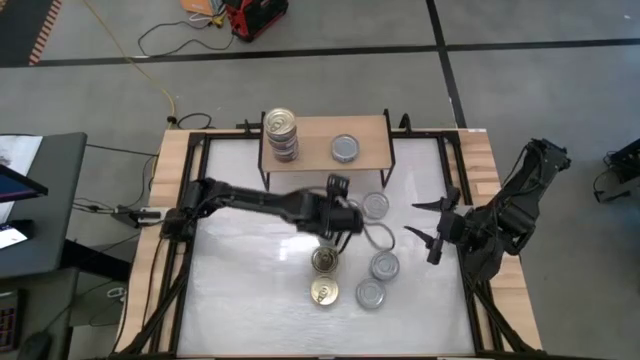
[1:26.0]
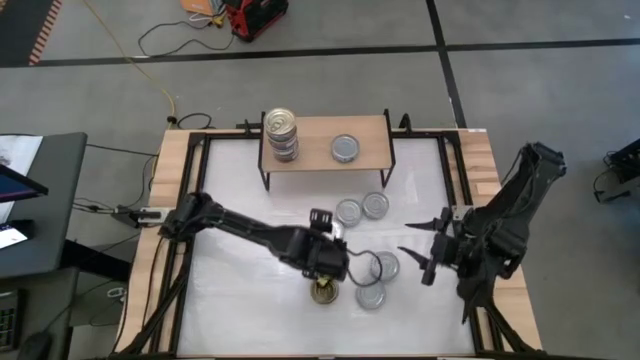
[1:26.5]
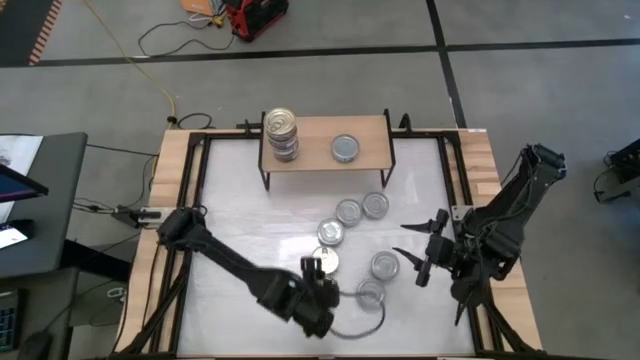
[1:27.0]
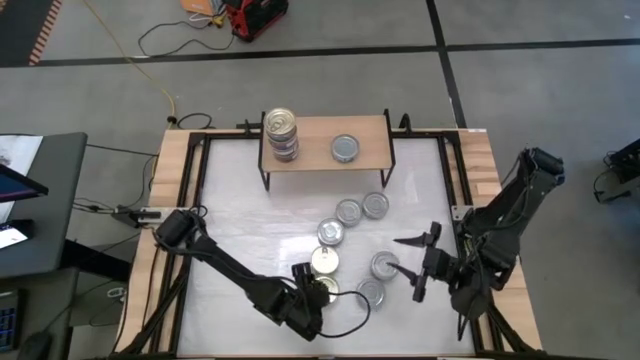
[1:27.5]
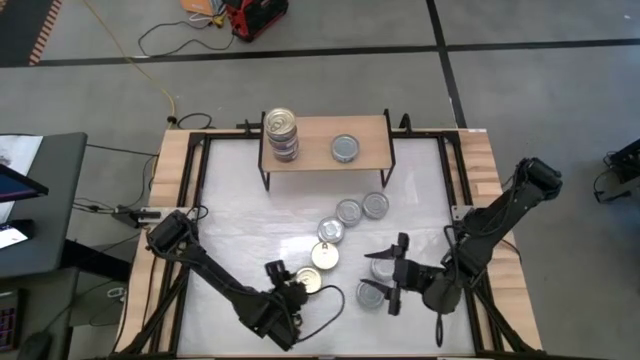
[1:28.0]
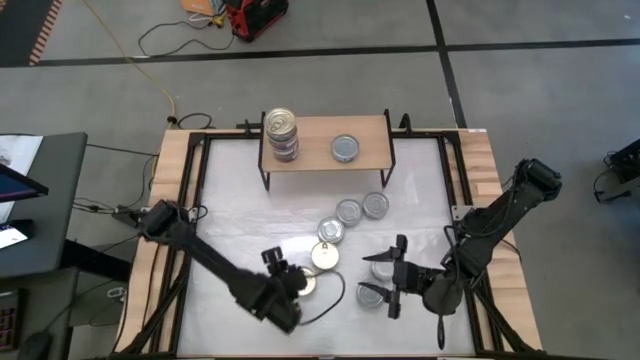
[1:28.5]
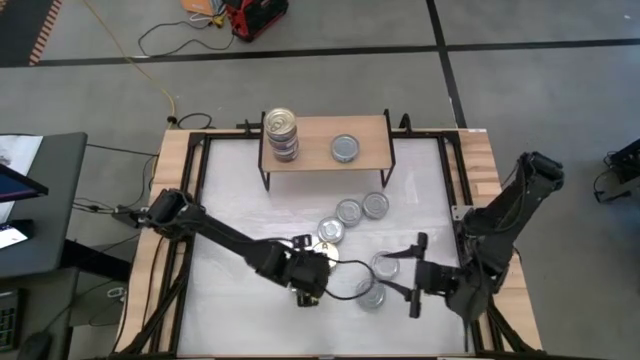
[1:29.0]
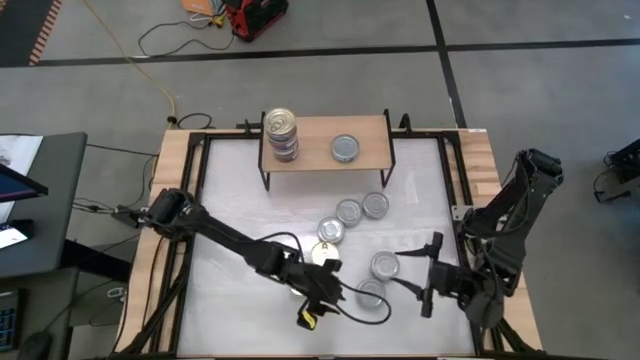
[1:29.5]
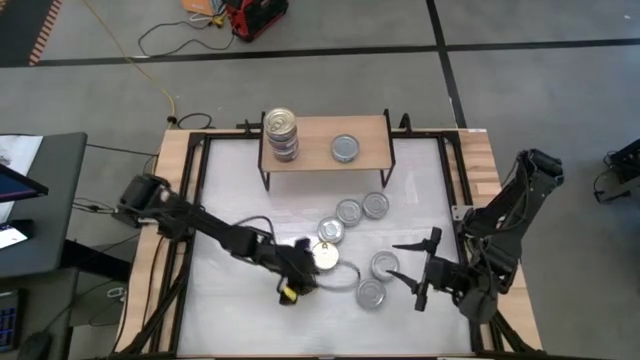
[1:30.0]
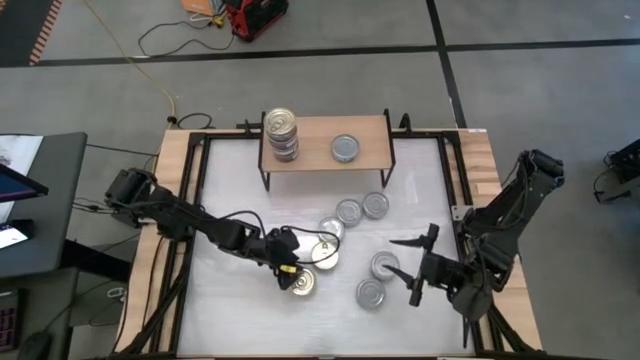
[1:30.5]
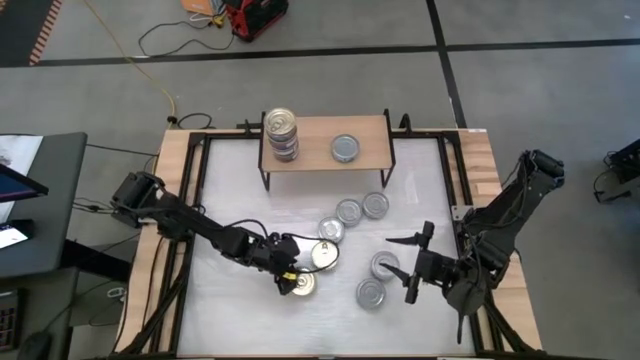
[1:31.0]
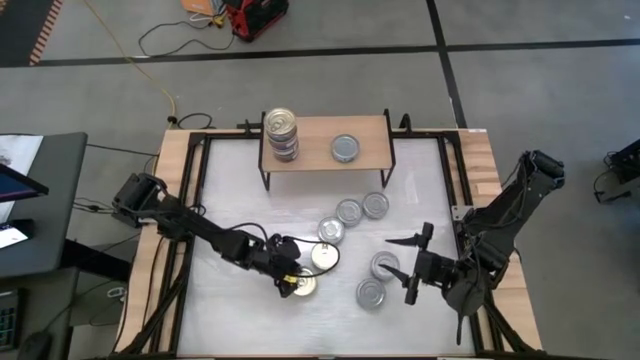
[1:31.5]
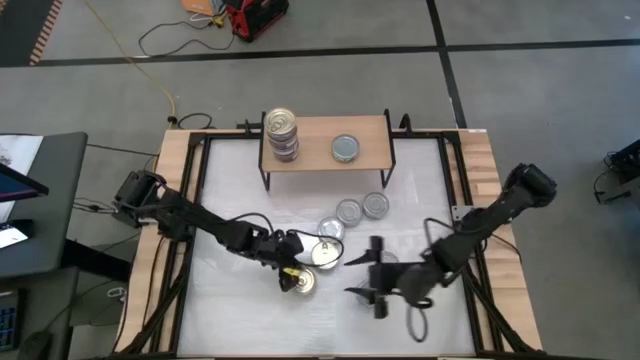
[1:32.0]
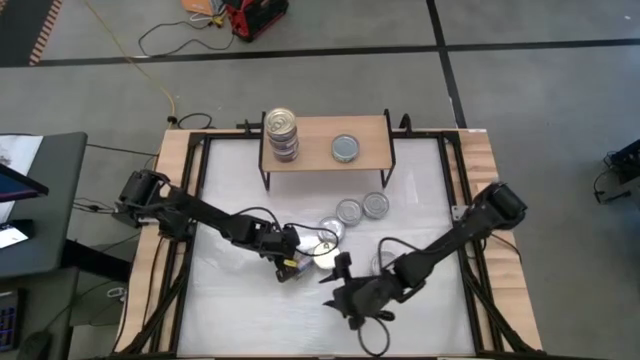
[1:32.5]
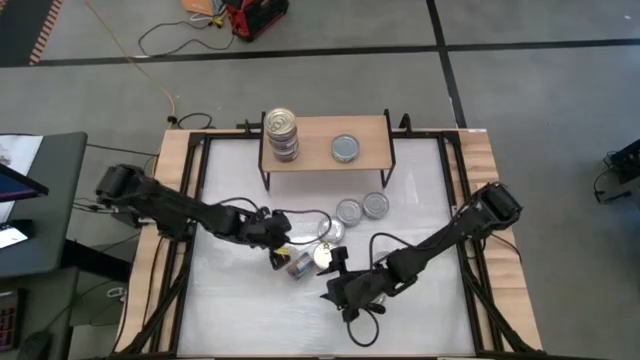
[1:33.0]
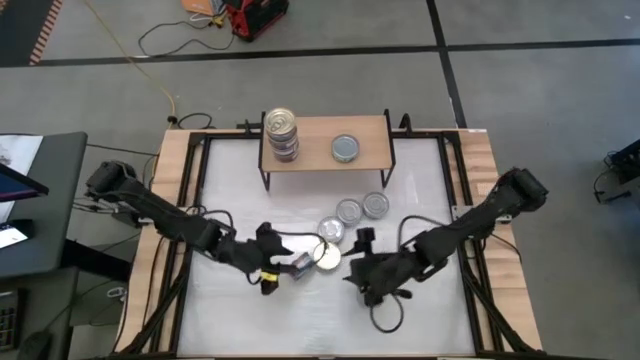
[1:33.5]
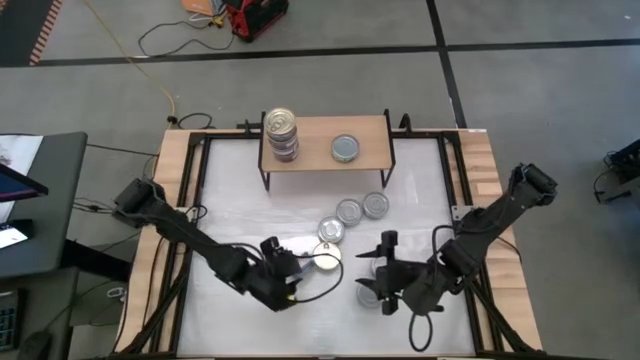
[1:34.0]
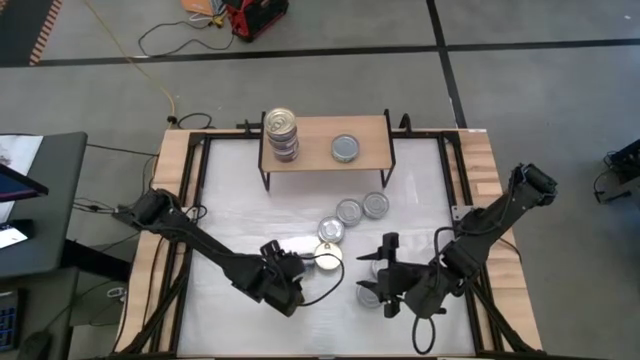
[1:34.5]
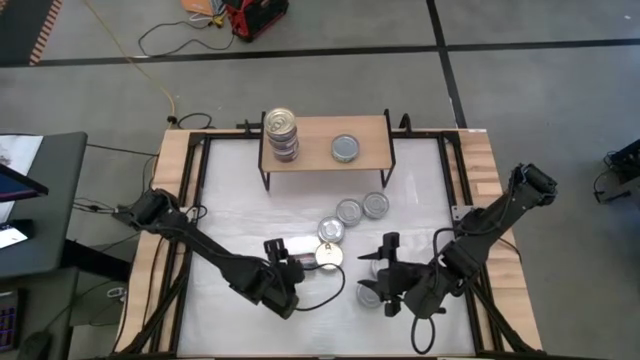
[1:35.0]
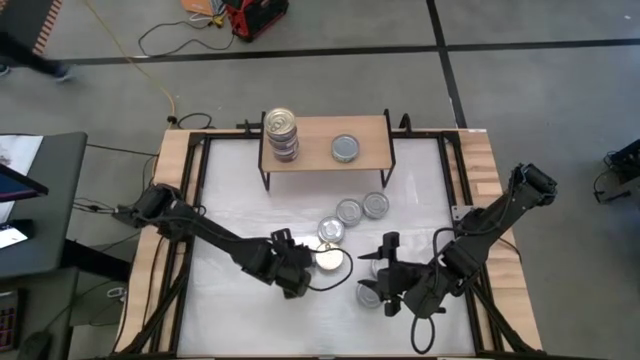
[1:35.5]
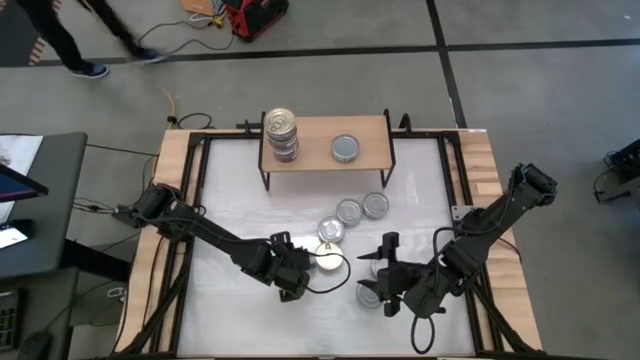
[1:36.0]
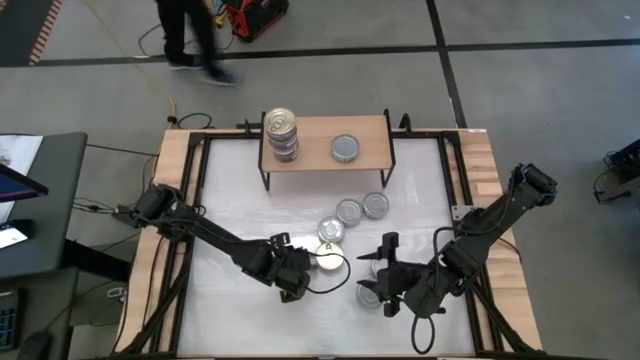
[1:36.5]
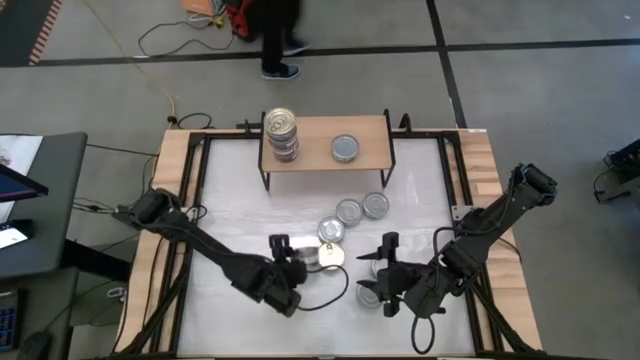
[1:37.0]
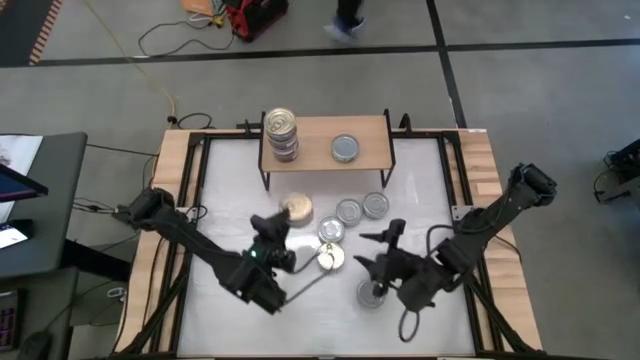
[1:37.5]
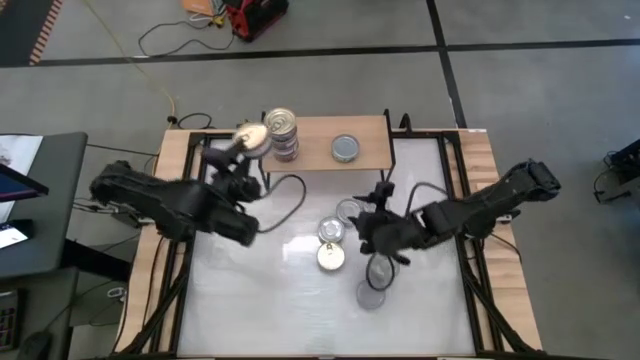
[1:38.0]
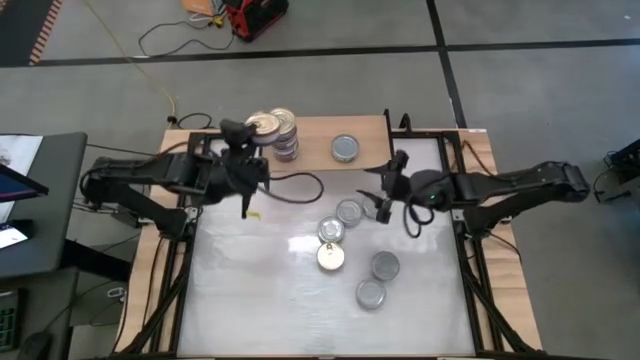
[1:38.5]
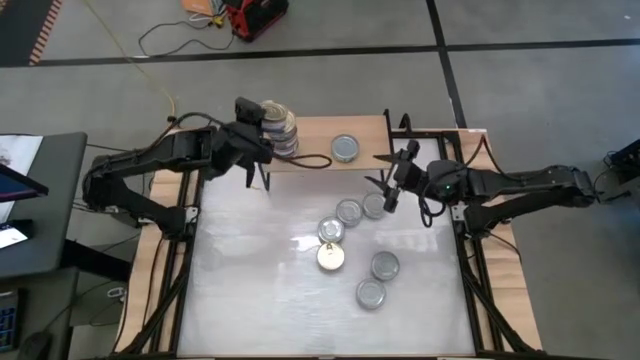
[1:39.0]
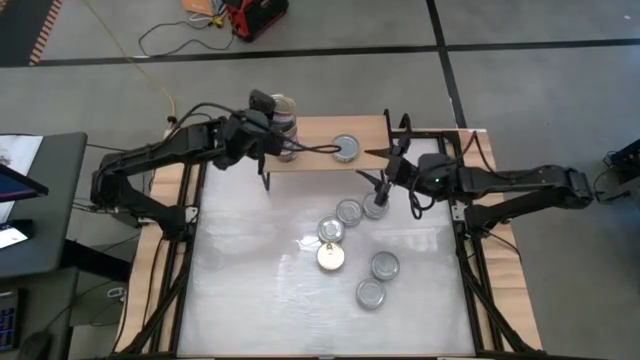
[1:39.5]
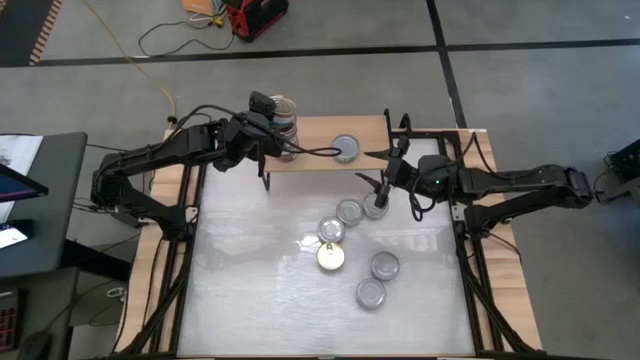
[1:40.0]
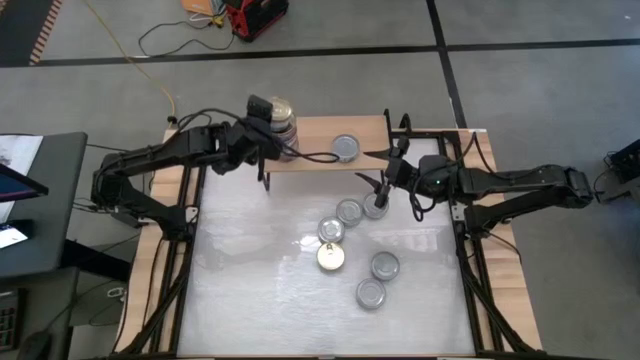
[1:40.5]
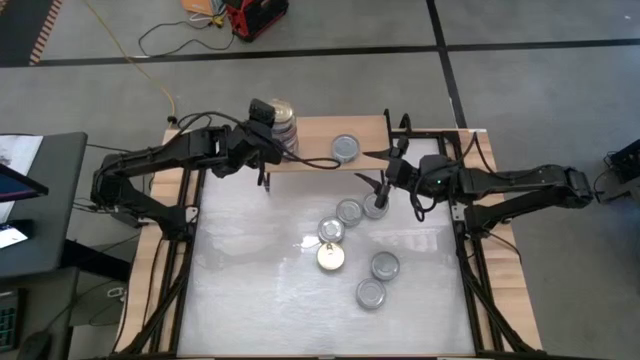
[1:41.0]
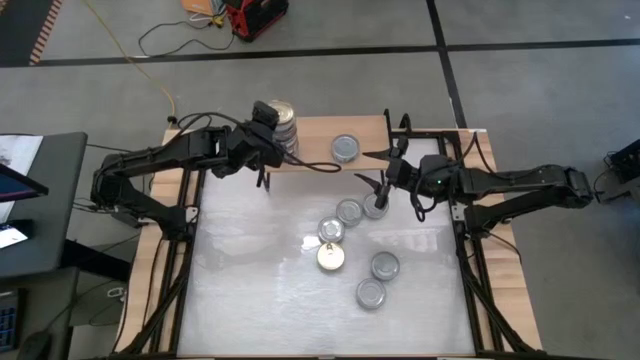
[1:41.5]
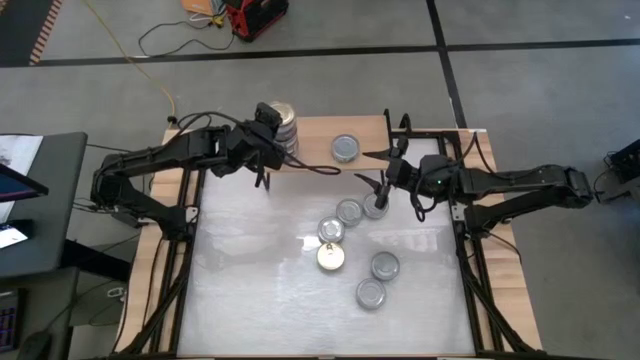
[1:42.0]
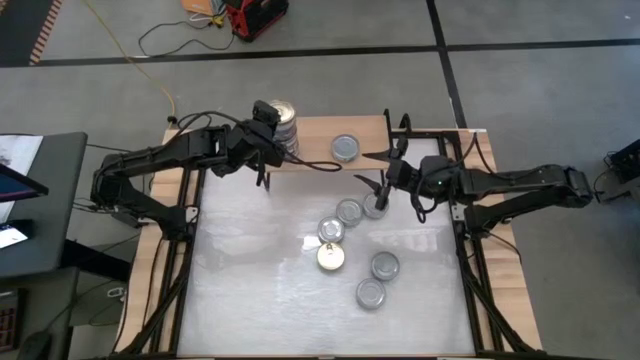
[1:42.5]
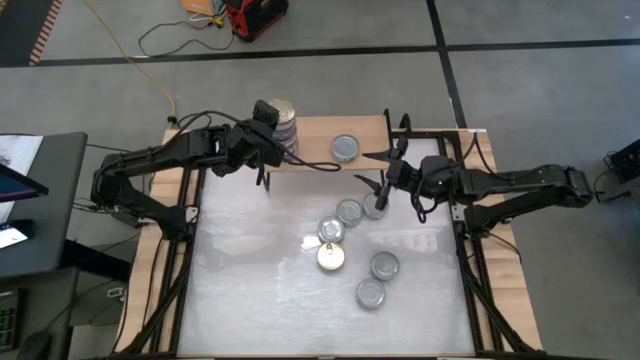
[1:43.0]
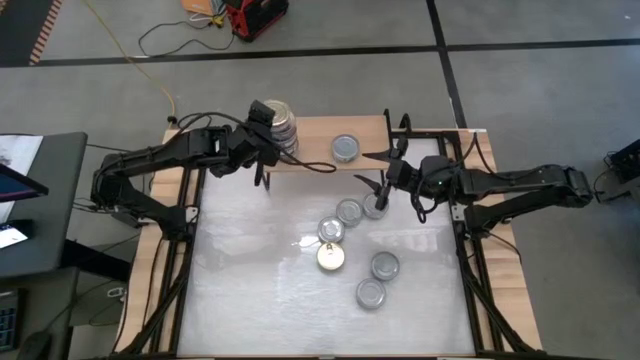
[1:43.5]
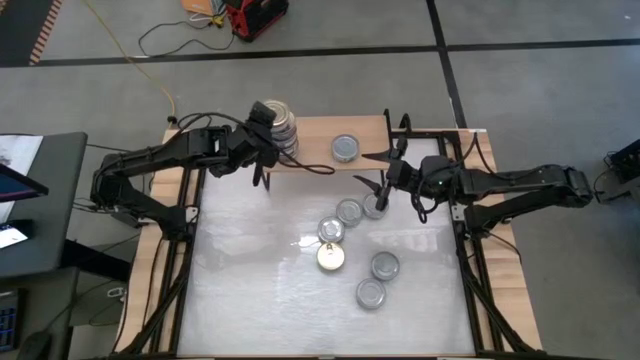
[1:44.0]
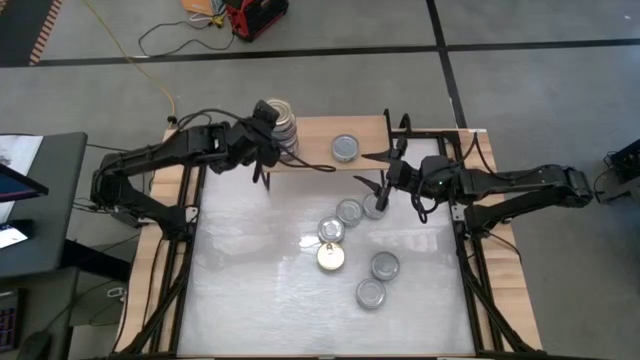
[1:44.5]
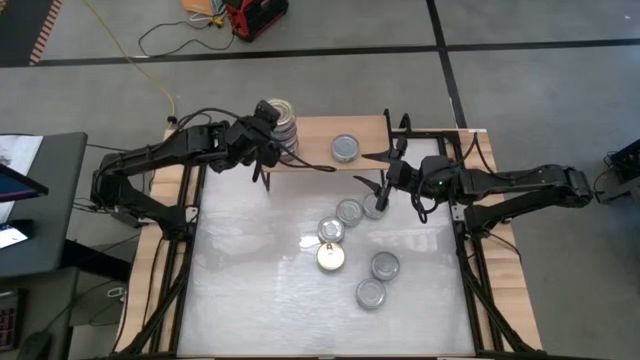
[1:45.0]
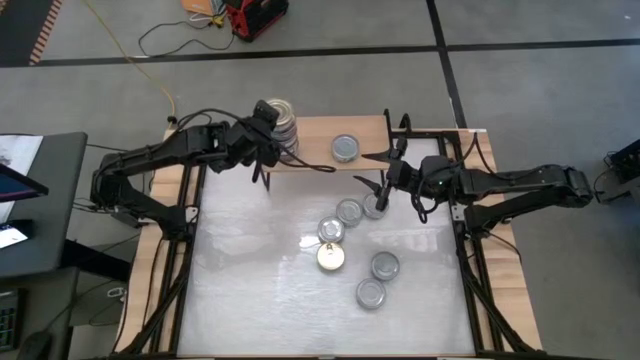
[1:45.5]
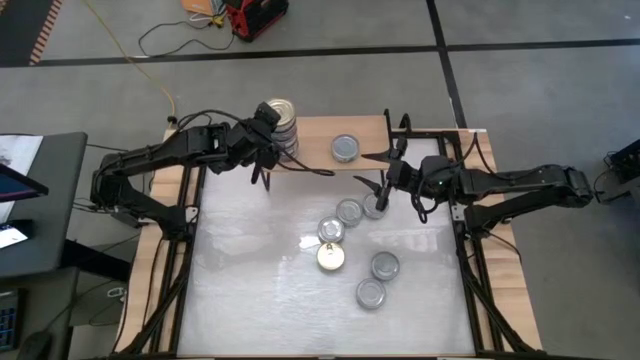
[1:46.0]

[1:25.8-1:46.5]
Task: Stack canned seafood by type on shelf
Stack the blue tuna can on top of the blue tuna can

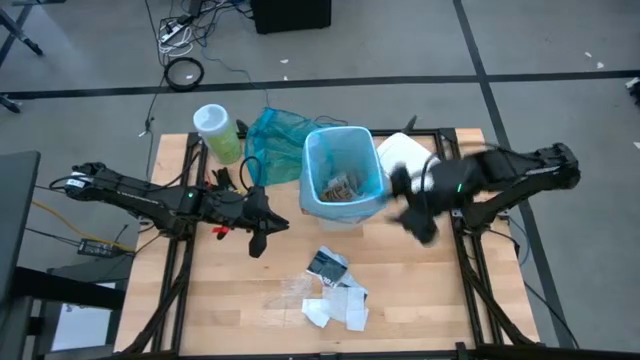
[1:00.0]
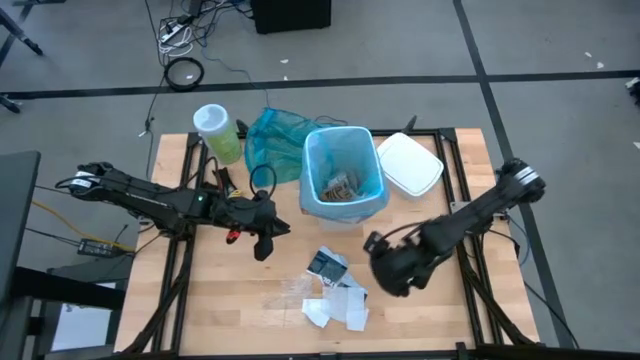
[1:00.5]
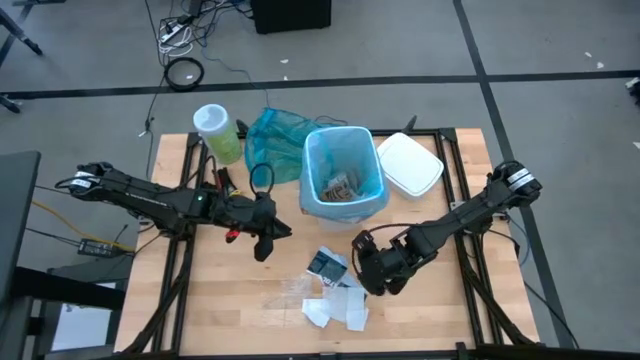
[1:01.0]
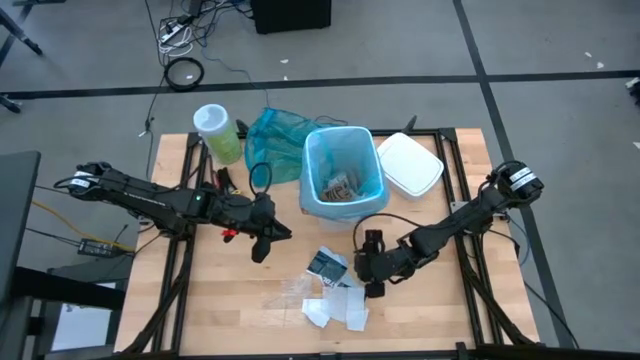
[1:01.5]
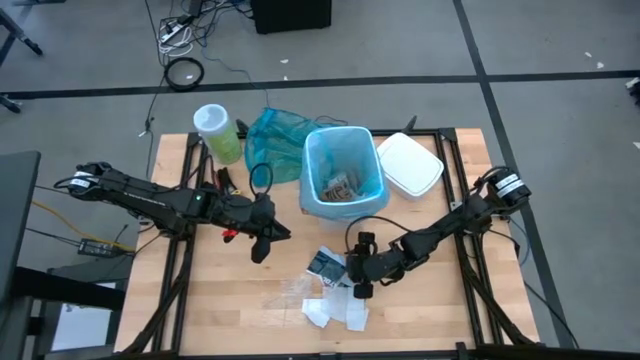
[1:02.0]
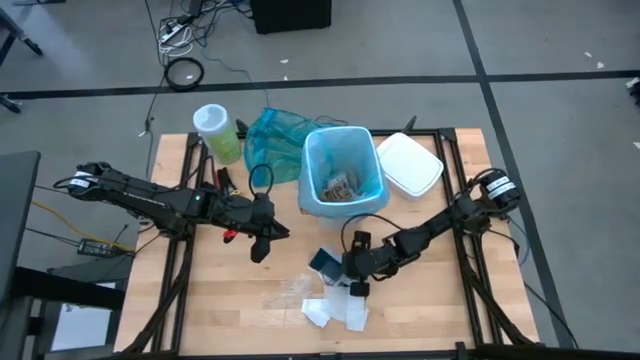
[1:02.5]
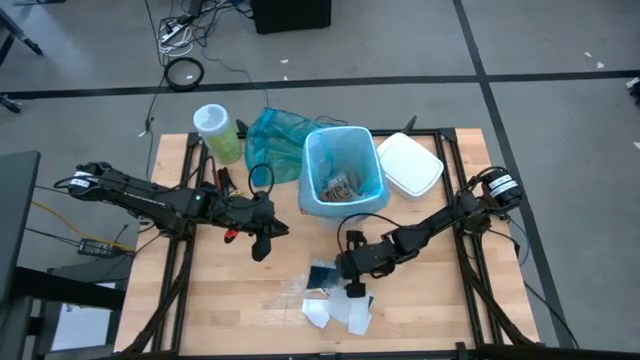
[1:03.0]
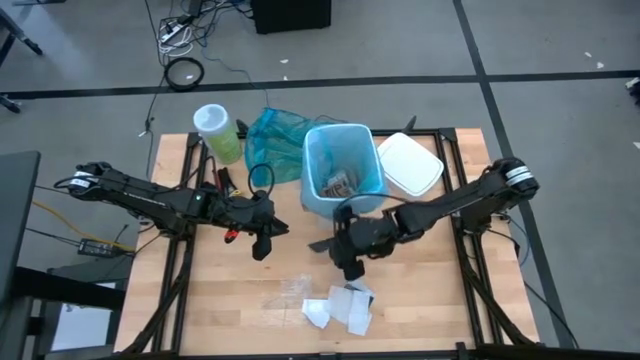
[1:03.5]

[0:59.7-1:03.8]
Task: place trash/remove bag and relplace
Put the black paper into the white trash bin
